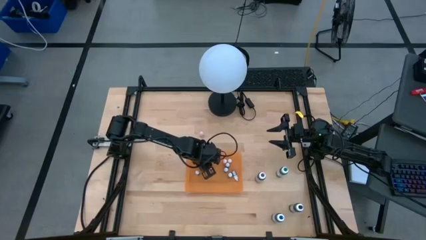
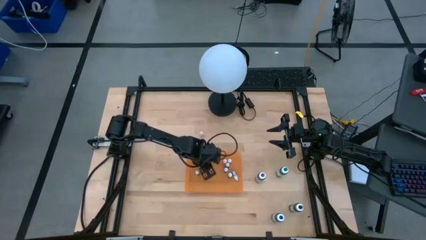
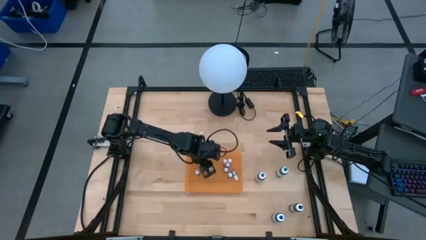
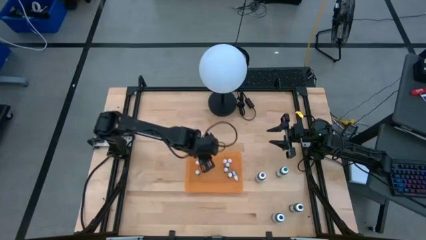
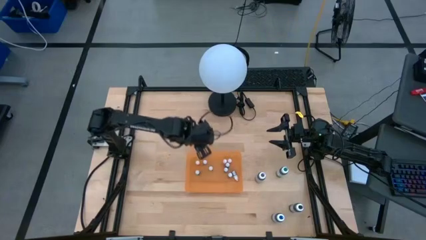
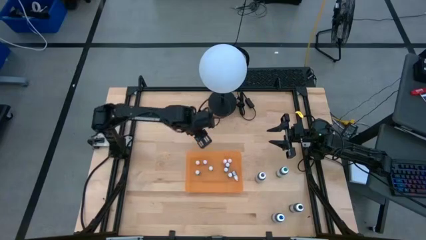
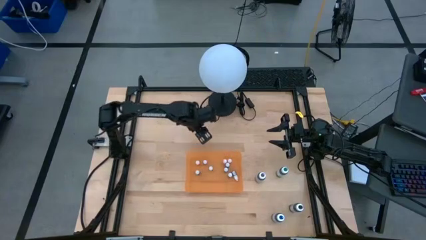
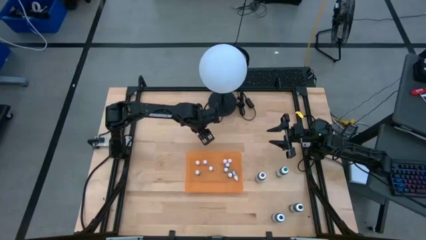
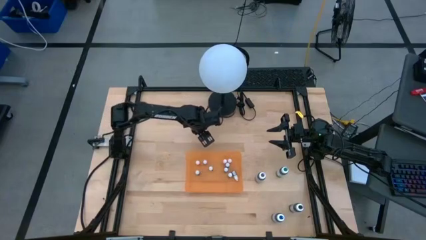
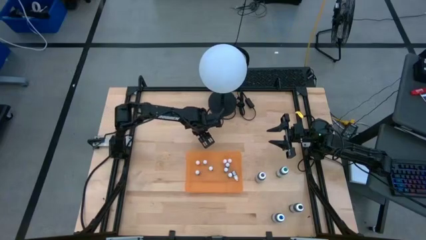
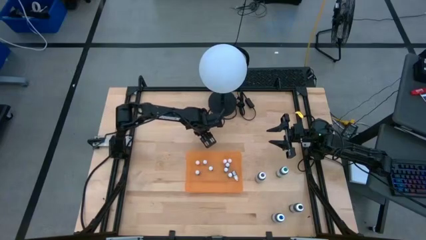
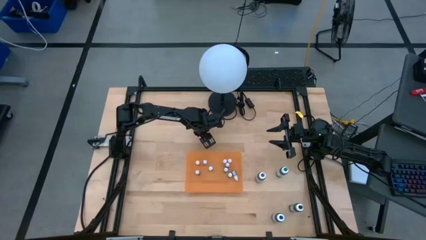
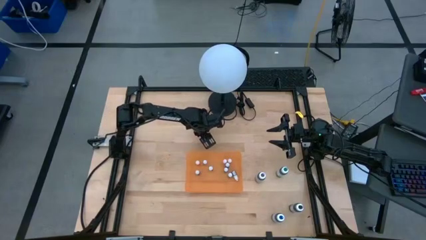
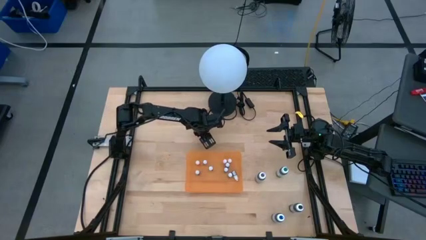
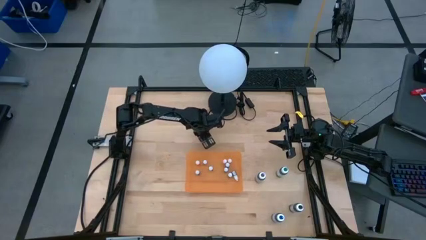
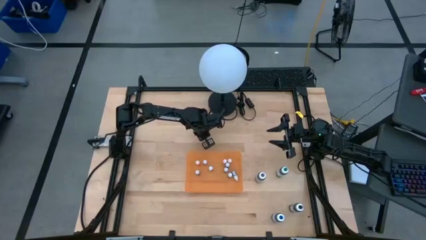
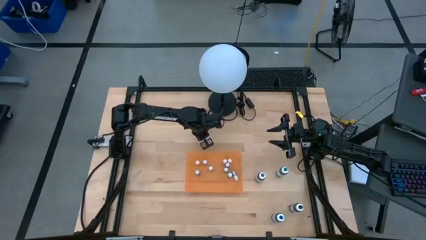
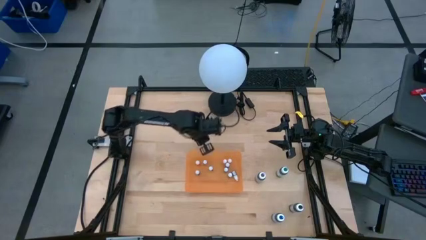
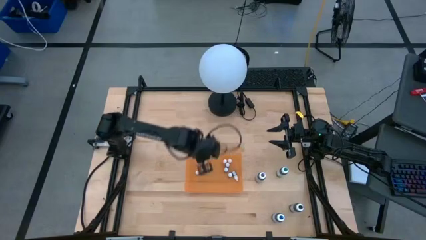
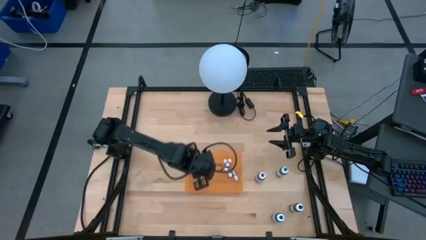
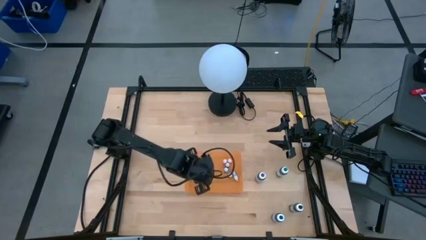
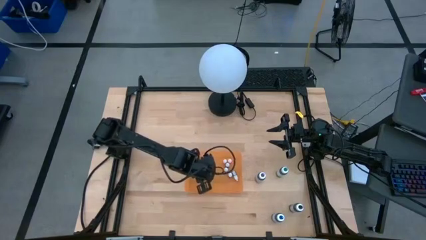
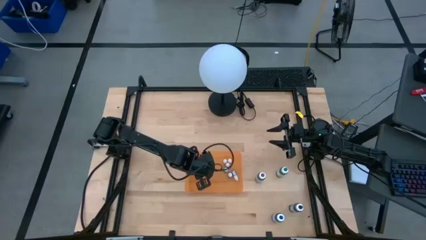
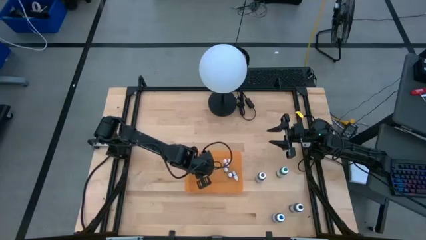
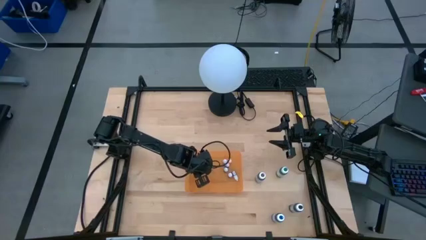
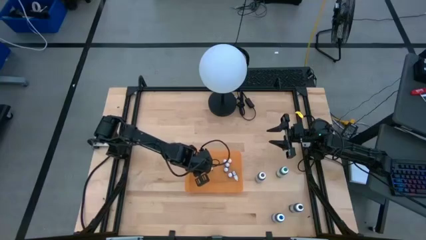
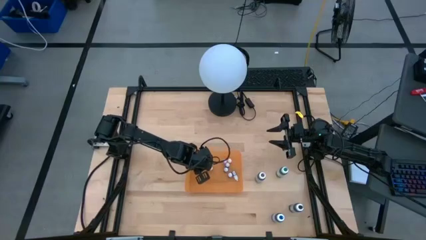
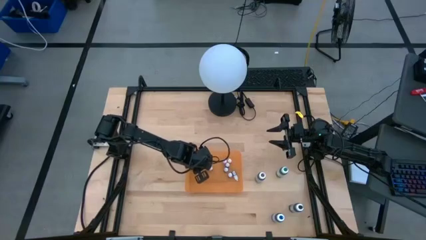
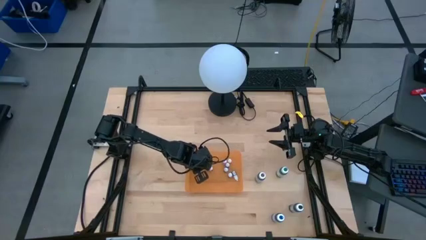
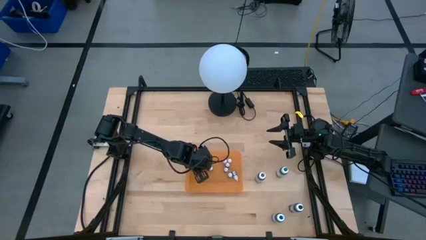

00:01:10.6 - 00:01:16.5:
Task: Pick & Place food coloring
Put the small orange food coloring bottle into the orange container

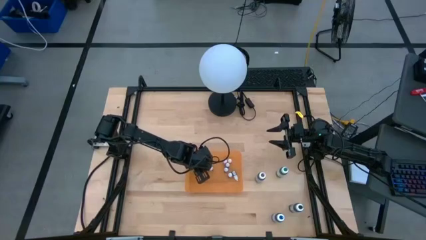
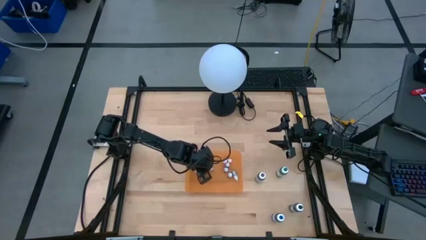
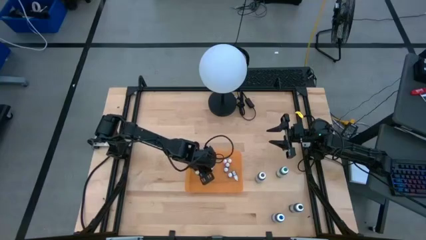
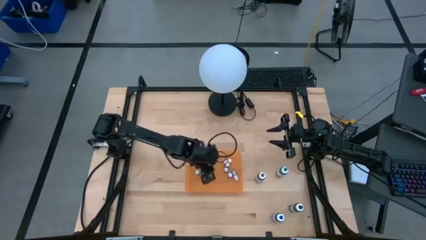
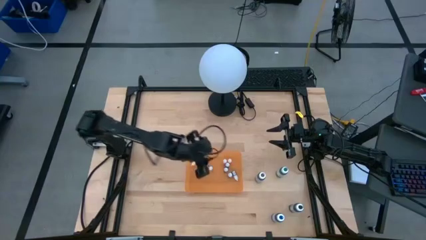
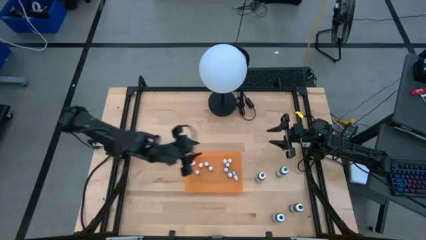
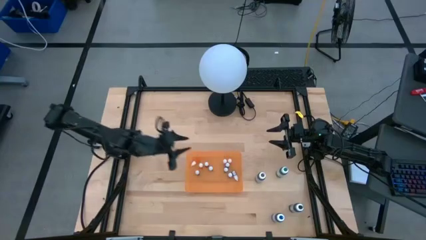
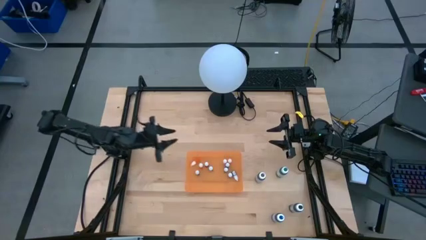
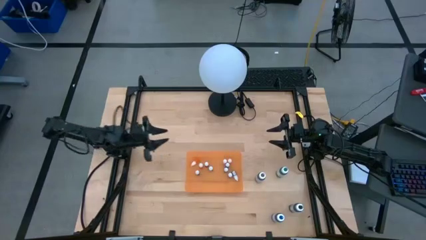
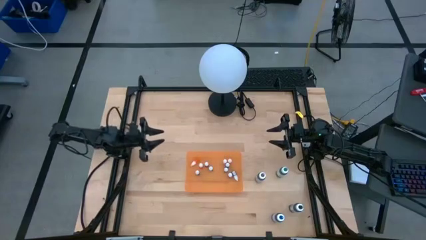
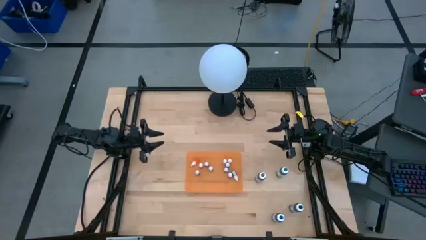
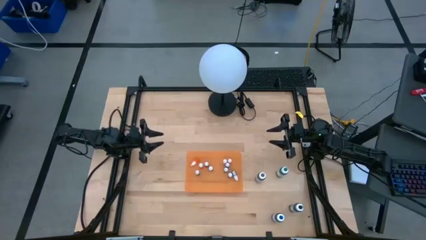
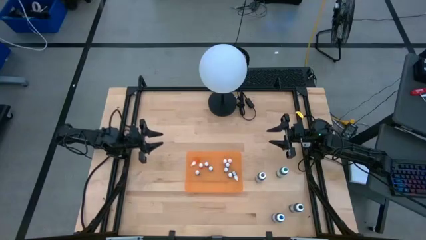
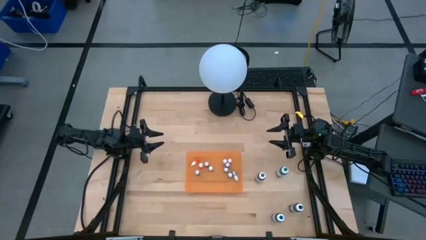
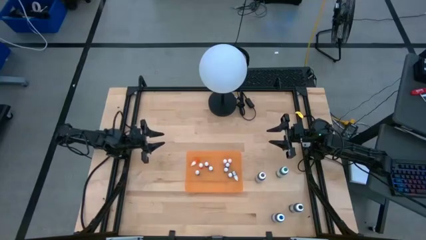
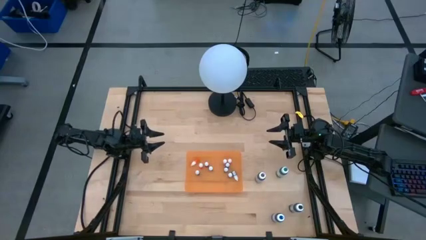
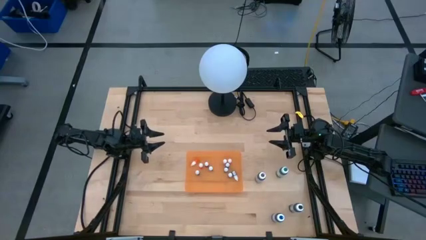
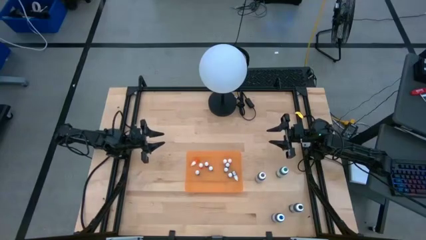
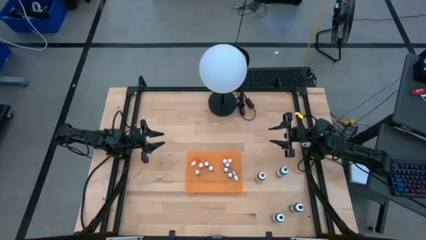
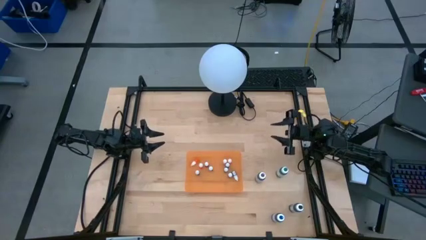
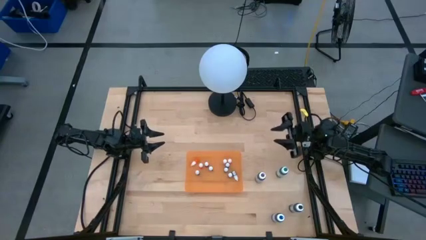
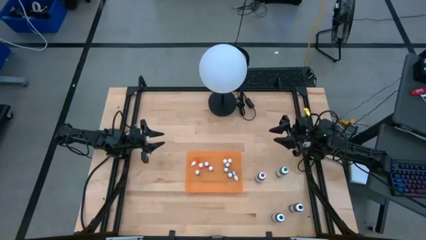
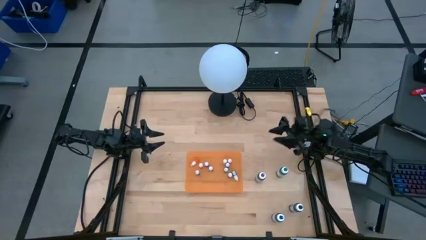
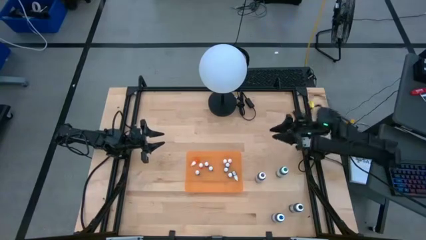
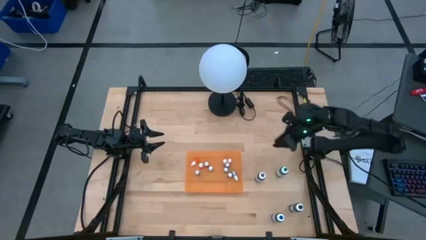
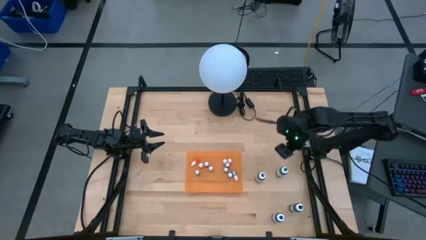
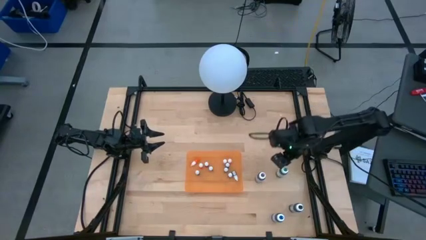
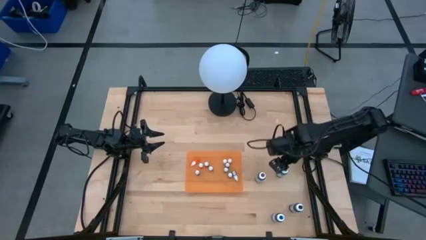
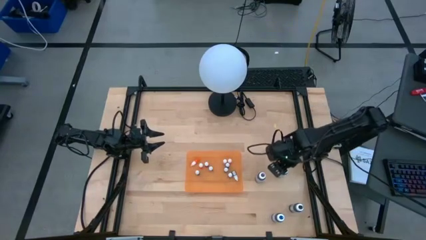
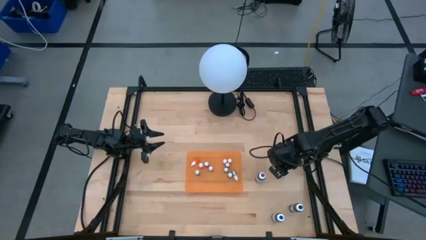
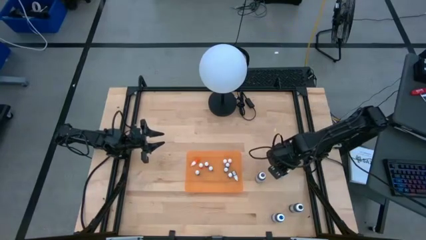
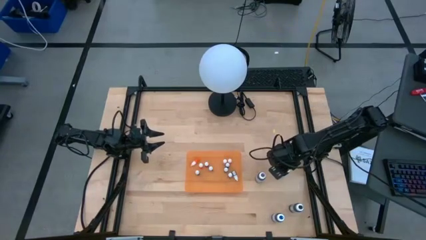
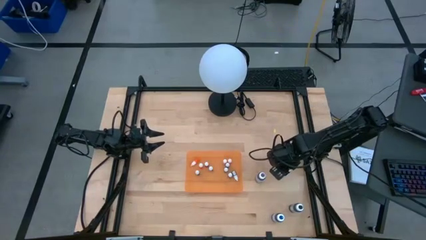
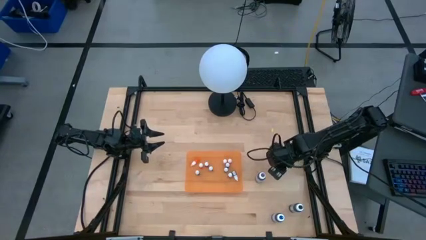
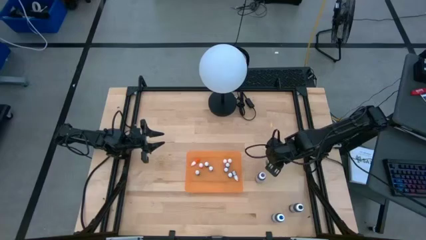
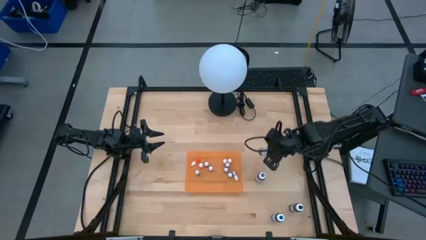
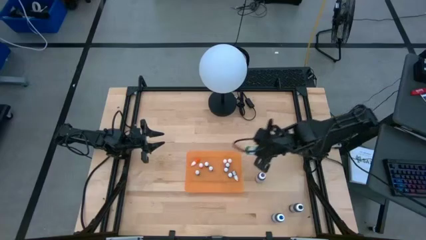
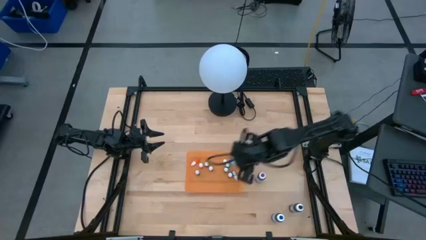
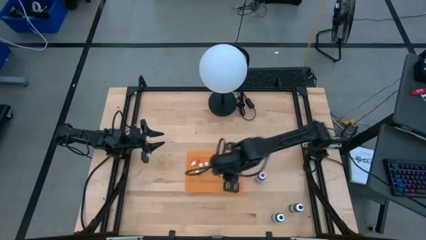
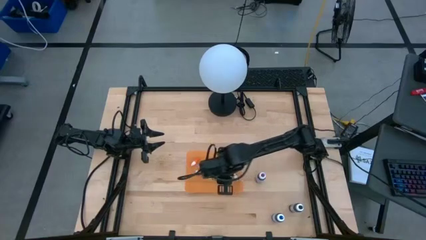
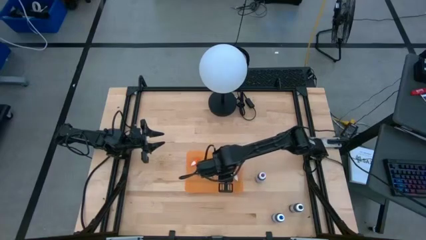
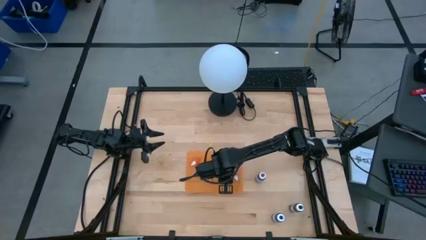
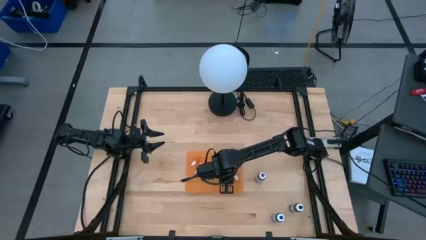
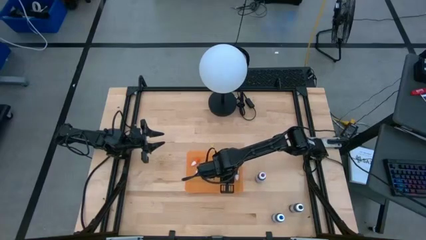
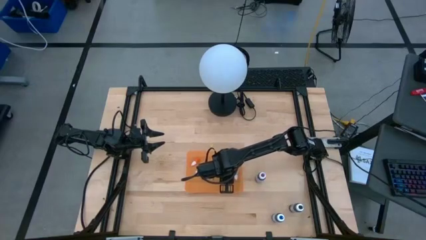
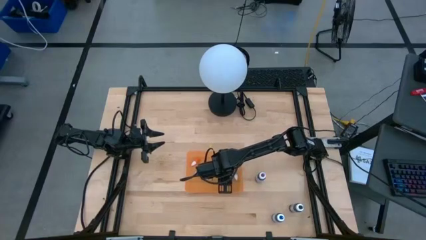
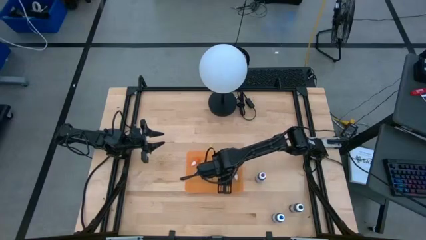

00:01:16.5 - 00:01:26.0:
Put the large green food coloring bottle into the orange container
